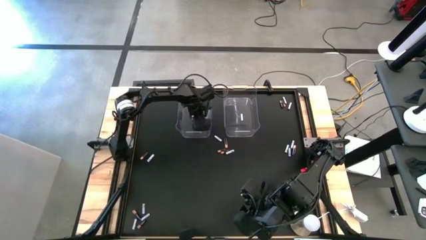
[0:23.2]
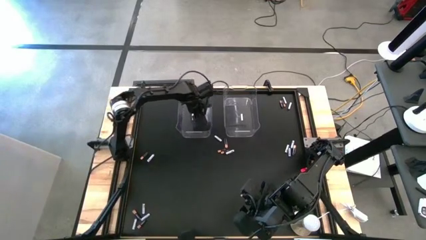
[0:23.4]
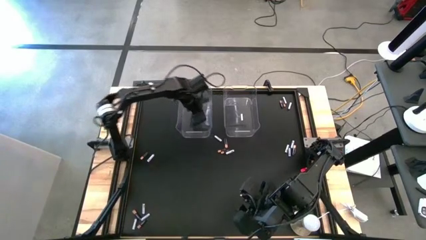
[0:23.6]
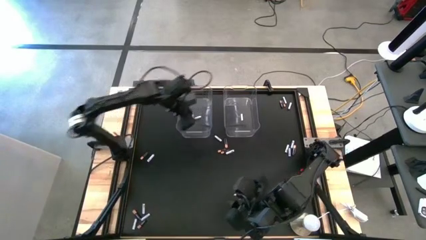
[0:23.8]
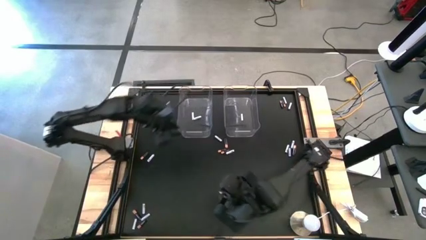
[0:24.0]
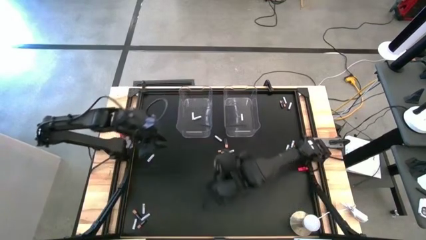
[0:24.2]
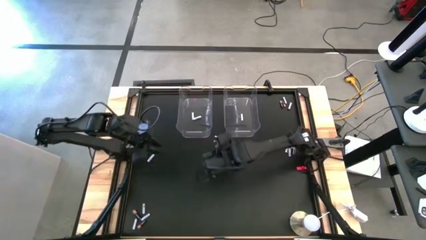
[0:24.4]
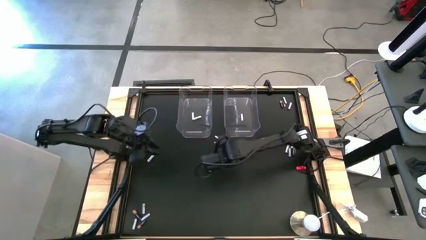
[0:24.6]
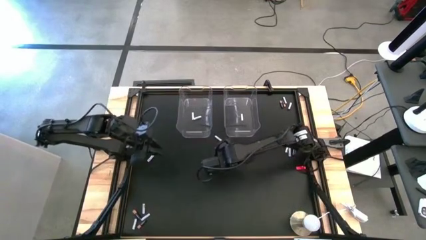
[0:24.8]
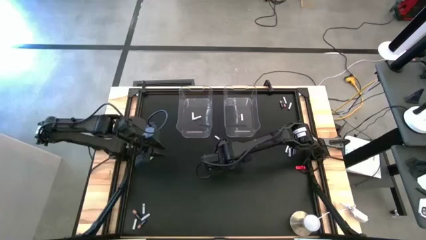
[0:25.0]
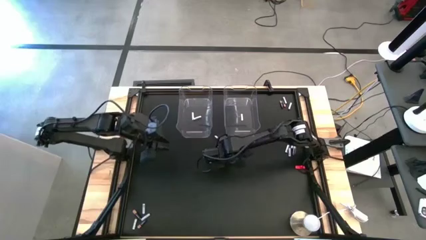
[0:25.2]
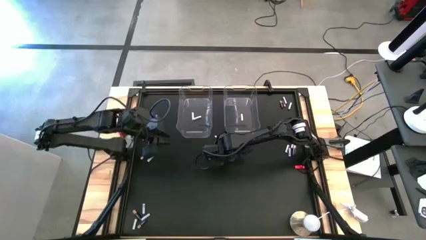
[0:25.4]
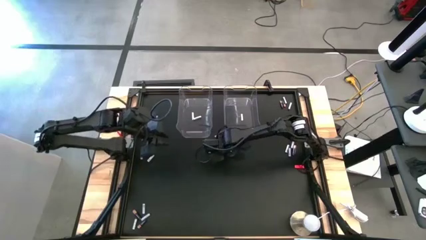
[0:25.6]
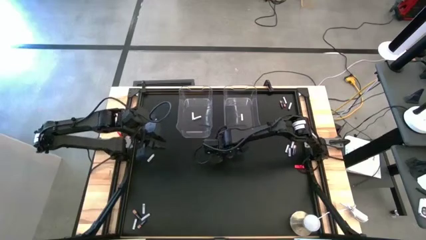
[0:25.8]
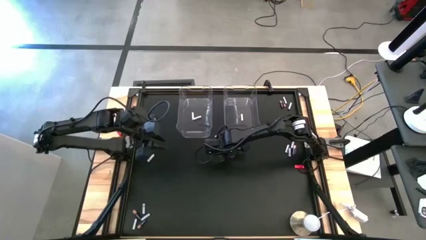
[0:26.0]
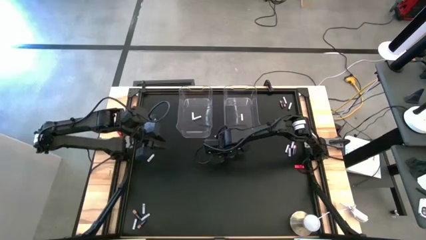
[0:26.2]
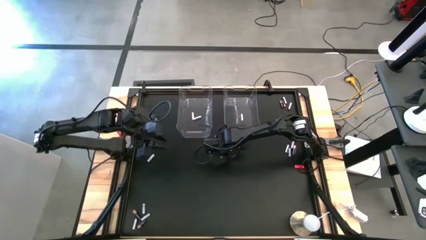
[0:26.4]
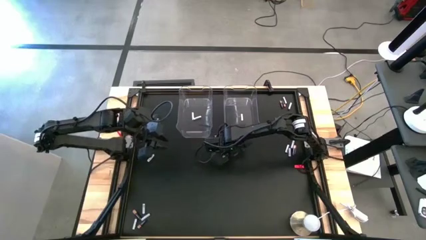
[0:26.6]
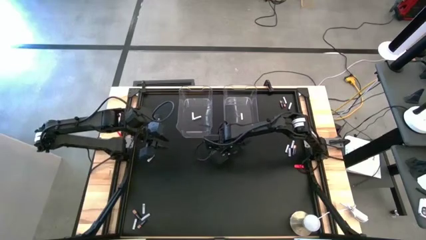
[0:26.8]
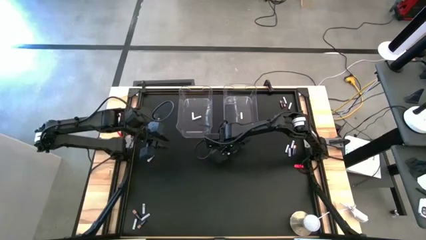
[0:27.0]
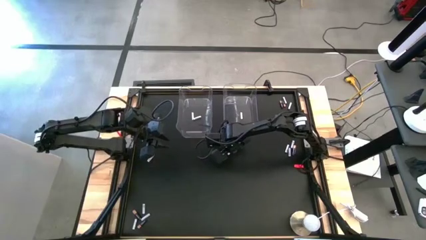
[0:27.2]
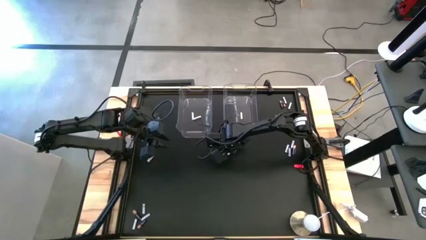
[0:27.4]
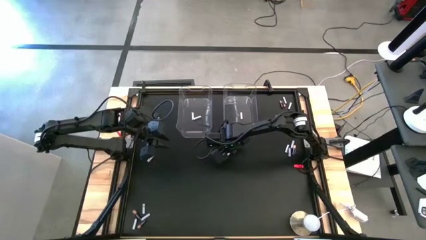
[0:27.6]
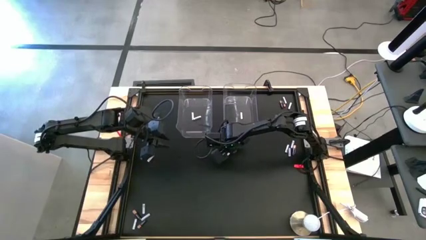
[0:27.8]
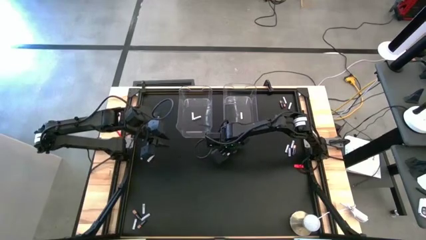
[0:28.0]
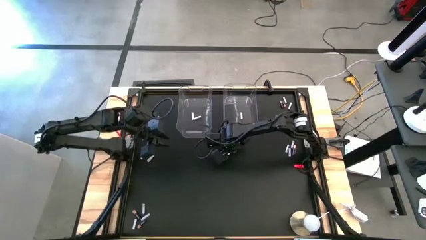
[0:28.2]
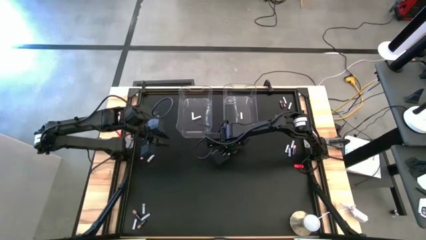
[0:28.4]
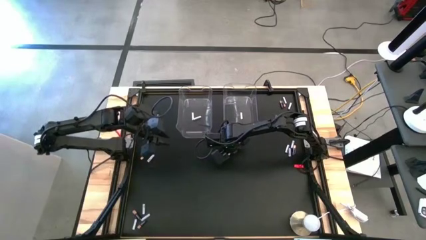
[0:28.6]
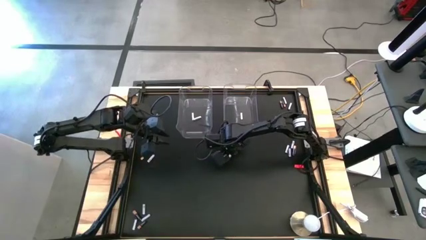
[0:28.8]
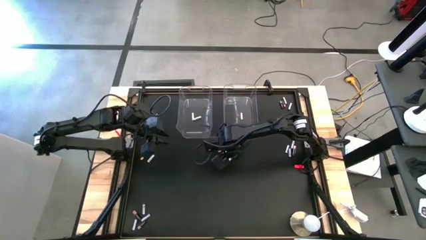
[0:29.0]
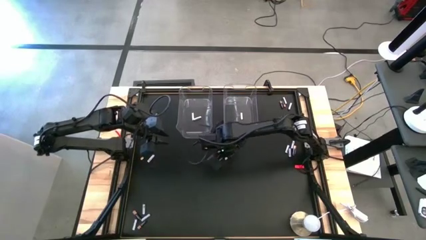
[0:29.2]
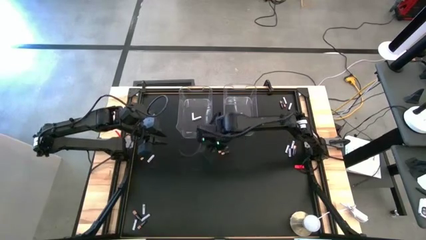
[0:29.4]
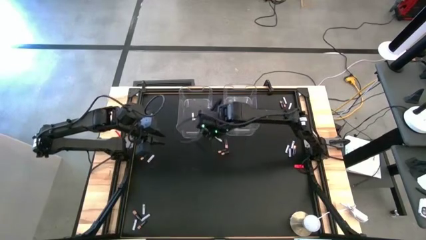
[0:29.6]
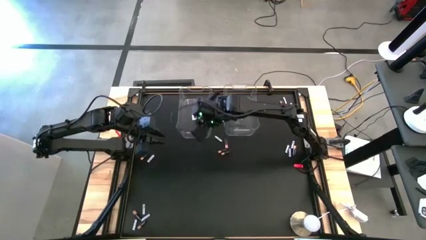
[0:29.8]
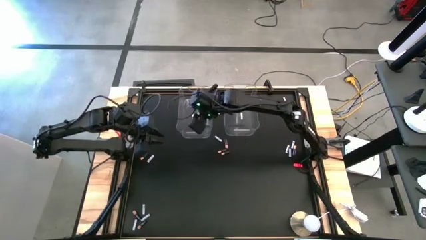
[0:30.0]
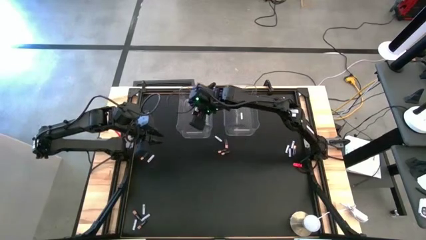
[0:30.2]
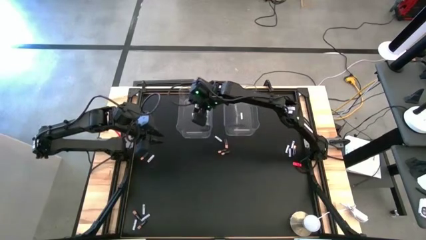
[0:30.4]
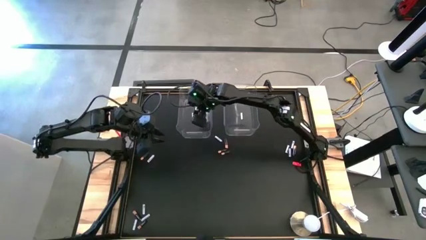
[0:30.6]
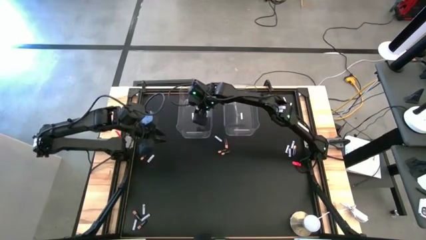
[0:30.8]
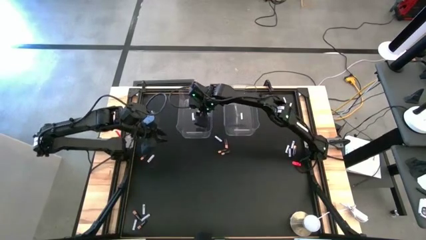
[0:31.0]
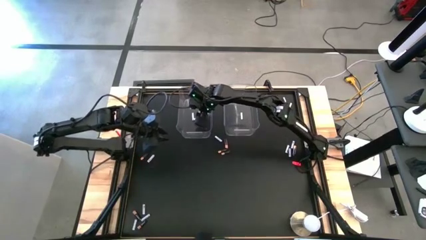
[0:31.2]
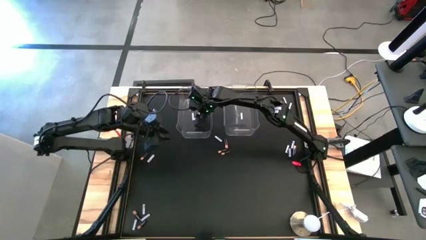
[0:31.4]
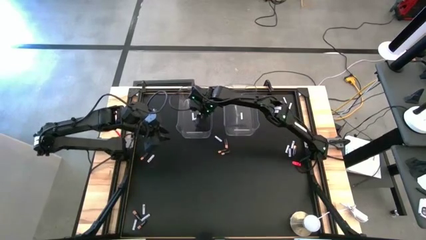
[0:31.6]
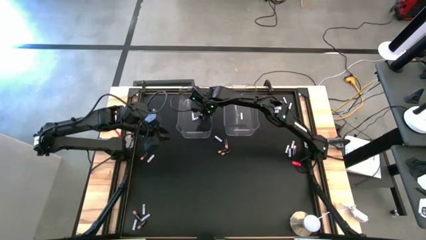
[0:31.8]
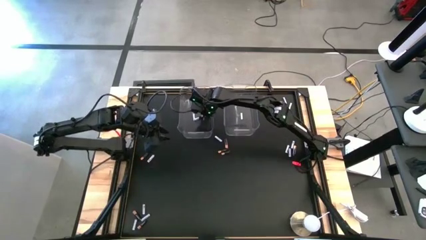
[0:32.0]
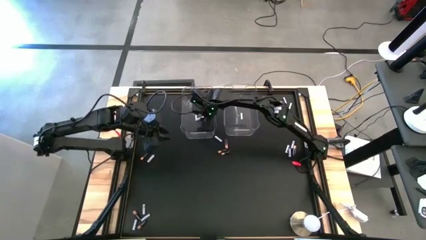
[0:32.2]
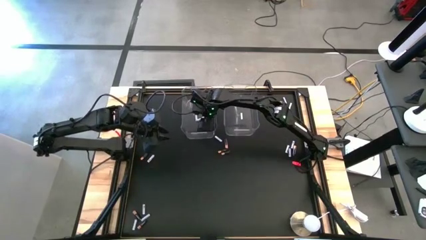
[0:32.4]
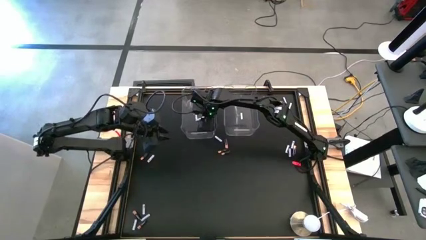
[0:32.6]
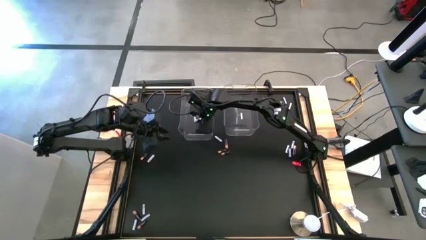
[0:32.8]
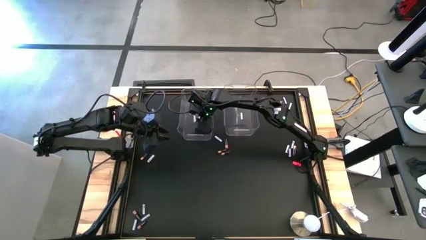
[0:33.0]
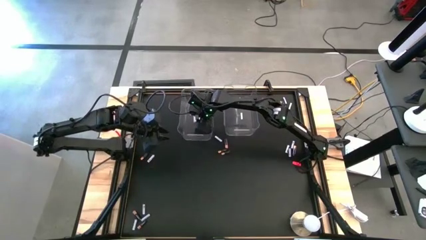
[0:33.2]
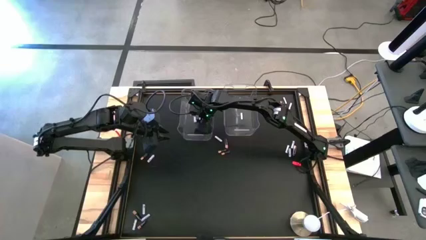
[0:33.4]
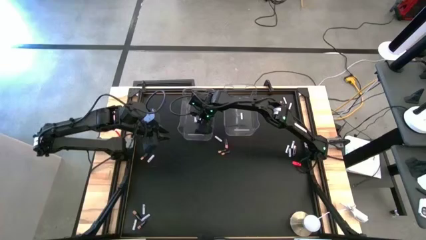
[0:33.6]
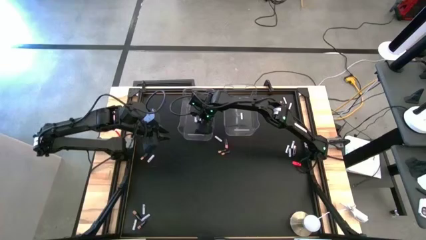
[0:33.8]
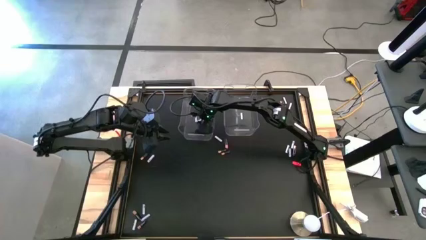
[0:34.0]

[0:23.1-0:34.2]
Task: Sort batteries
Put the white battery into the left transparent bin

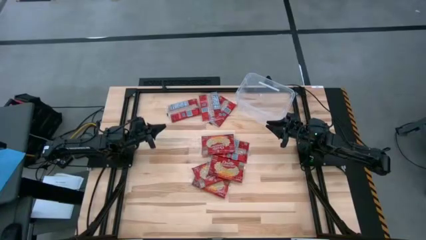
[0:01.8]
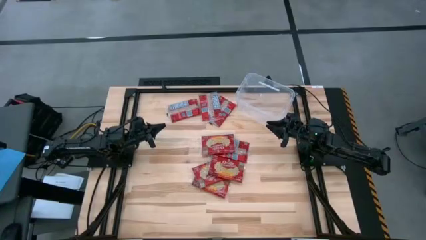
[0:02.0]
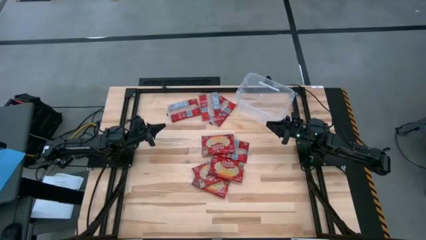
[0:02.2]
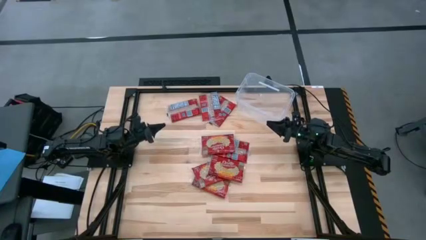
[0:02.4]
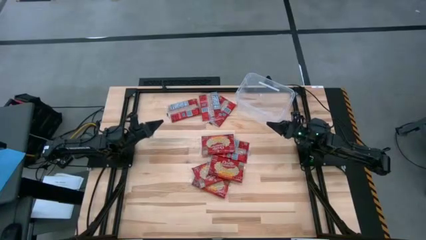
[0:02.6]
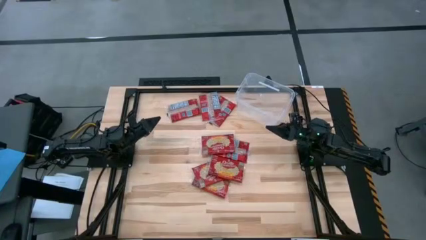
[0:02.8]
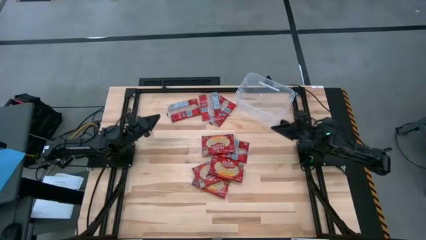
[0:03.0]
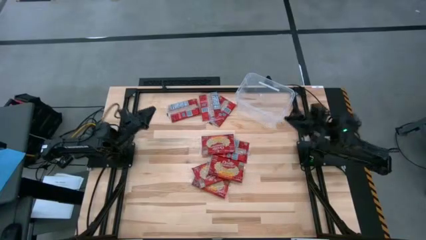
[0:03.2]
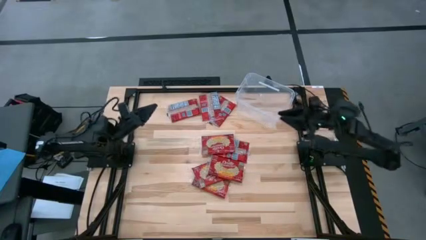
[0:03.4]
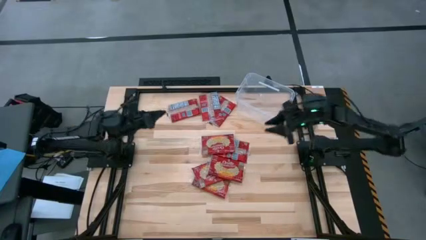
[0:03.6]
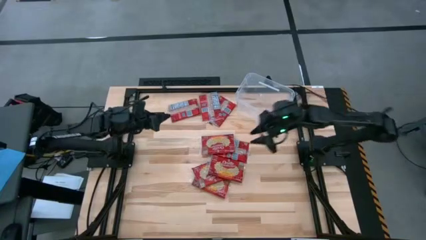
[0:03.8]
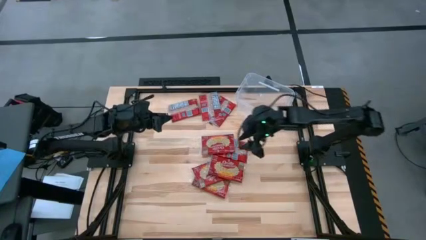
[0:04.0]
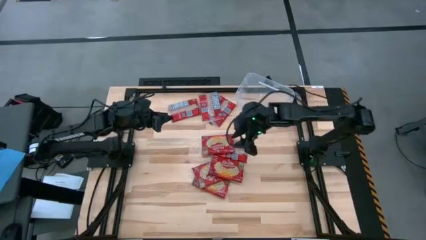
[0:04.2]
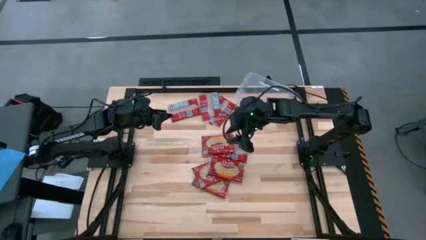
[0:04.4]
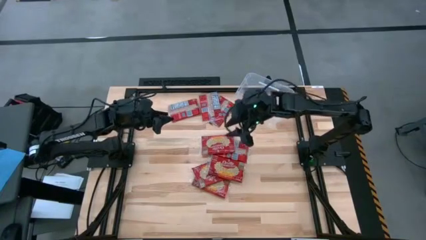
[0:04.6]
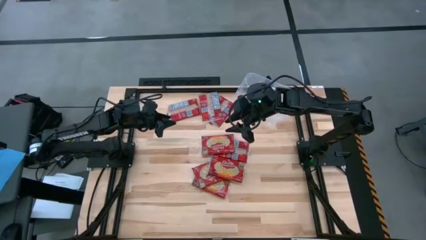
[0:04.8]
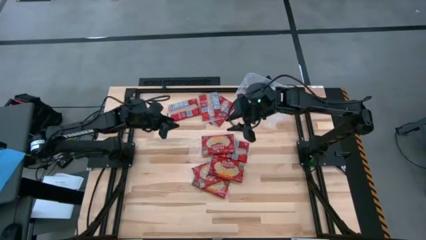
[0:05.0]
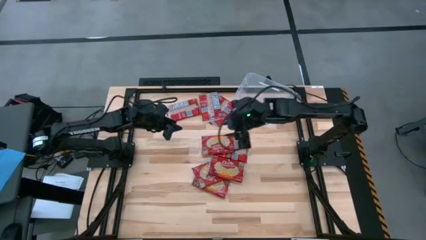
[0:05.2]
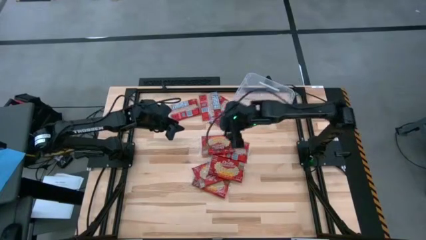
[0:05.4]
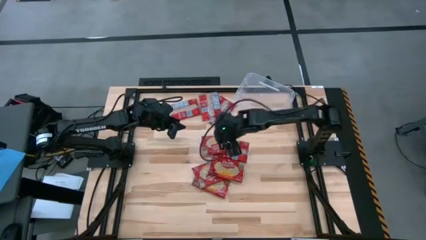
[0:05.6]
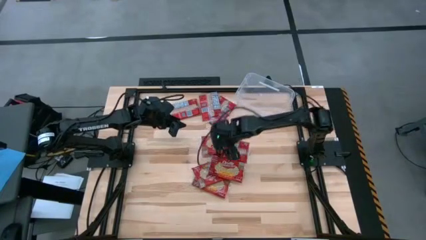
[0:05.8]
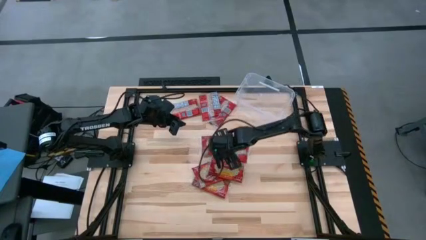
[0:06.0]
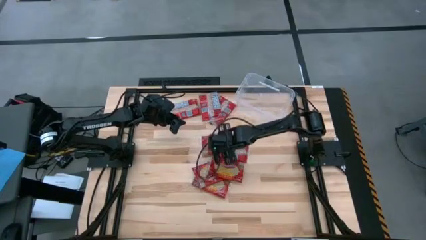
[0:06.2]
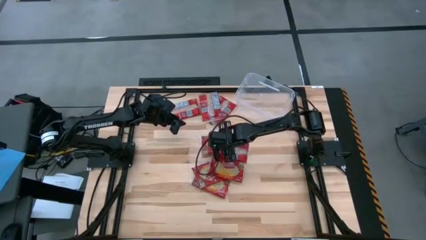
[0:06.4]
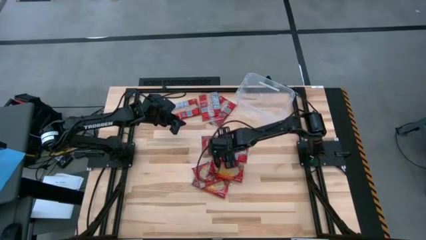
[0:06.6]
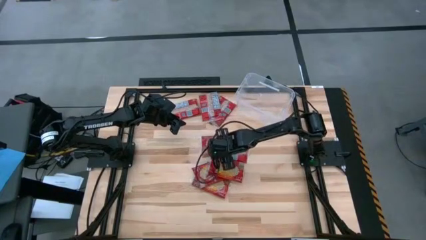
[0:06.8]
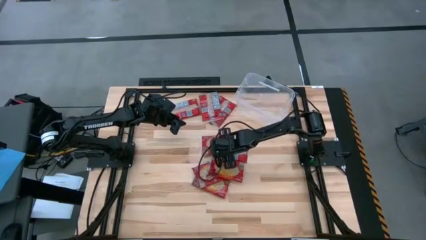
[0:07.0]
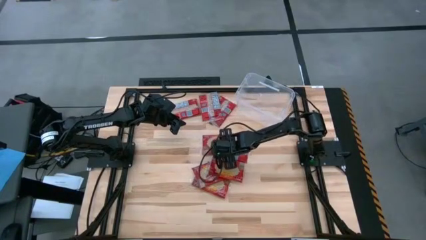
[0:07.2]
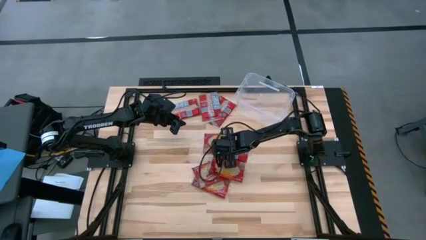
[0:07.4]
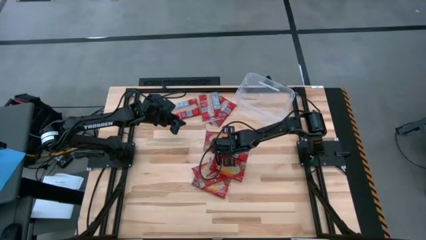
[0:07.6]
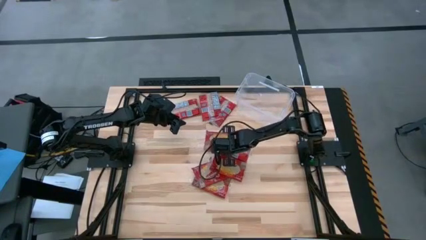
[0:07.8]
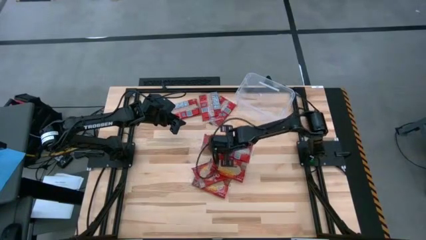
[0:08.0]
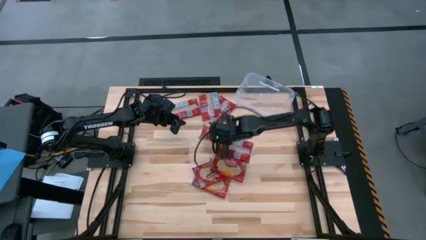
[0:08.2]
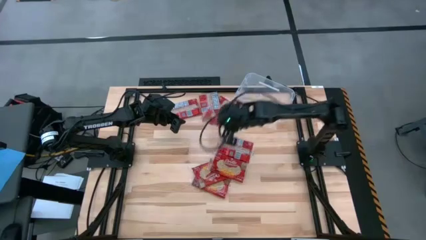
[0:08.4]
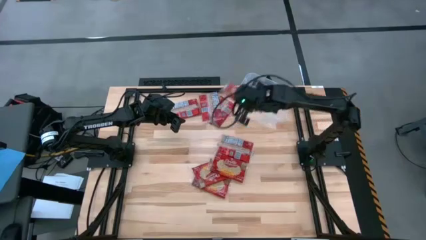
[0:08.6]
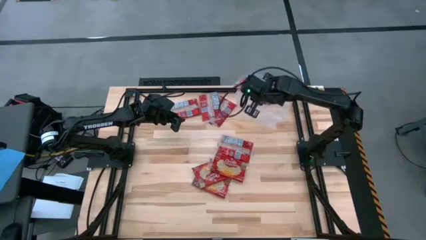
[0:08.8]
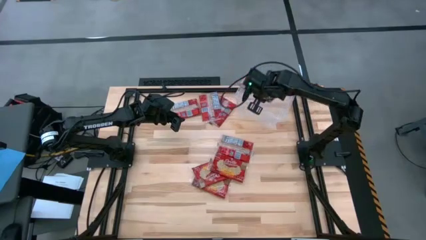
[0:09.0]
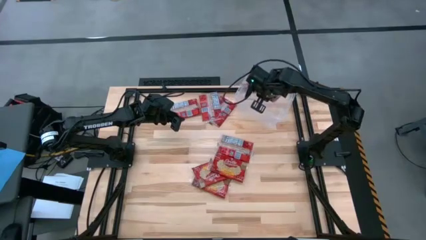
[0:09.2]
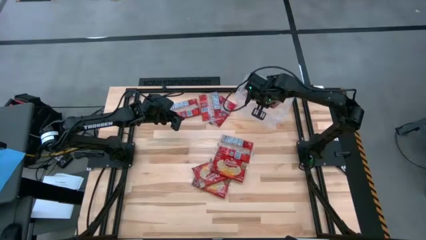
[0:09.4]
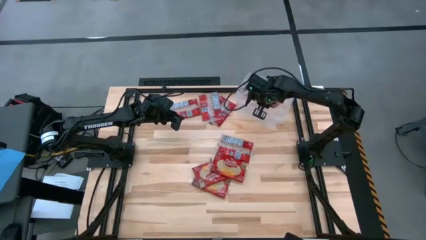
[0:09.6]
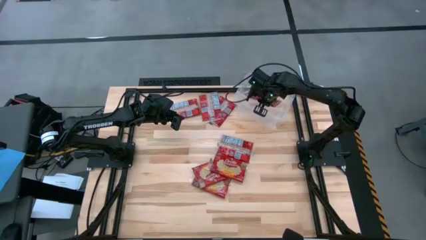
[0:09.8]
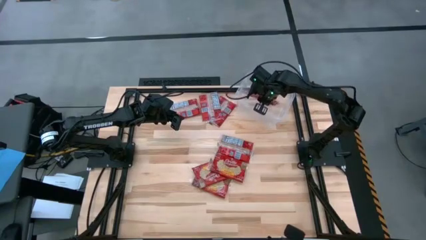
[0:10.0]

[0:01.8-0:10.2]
Task: Sort popcorn bags into baskets
Put the red popcorn bag into the transparent bin
